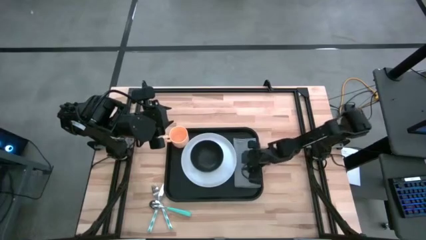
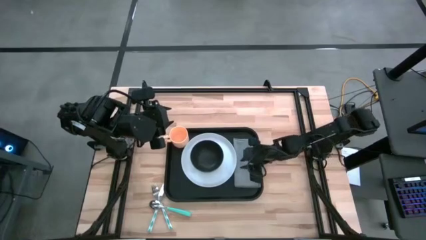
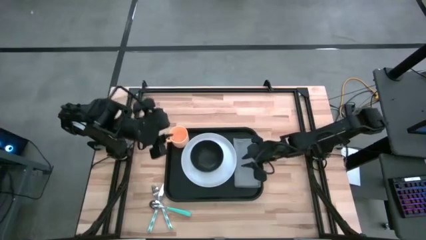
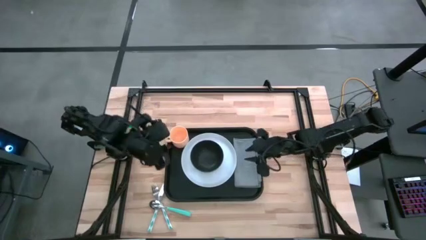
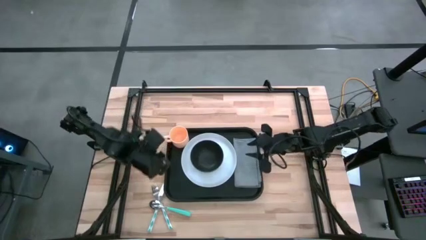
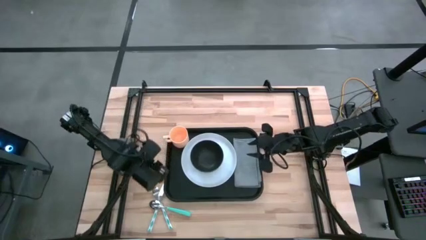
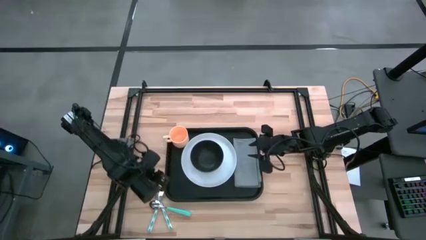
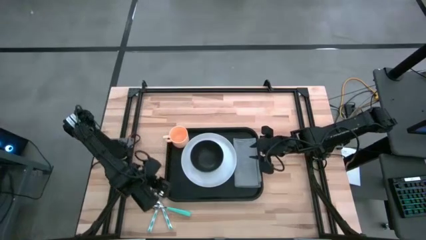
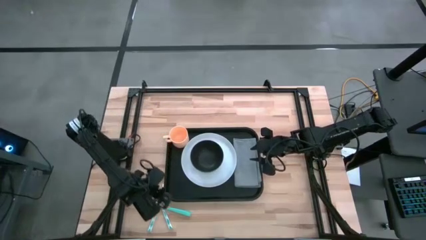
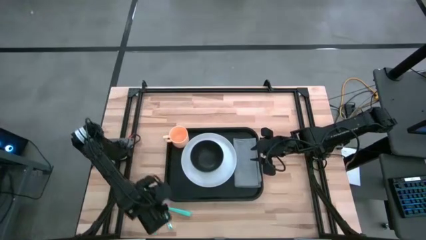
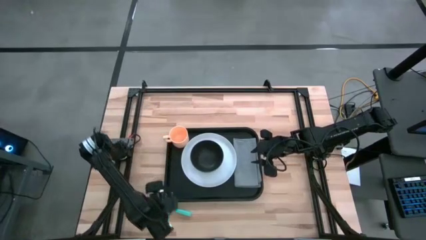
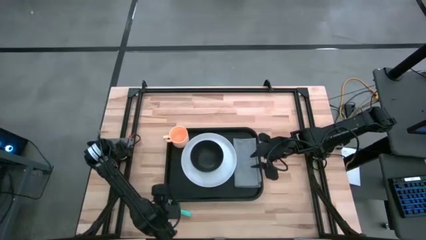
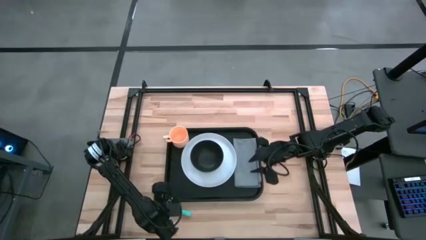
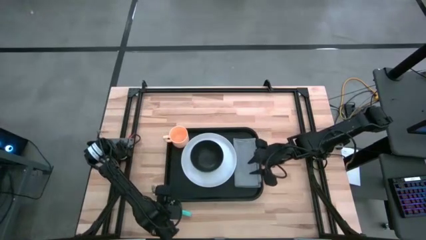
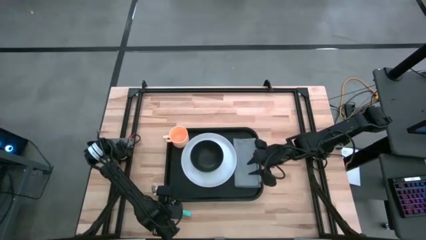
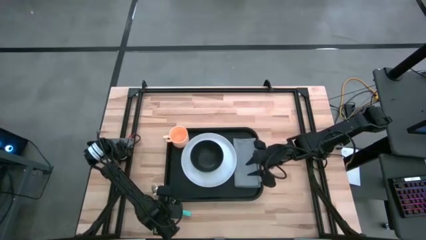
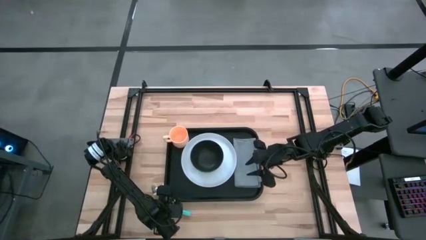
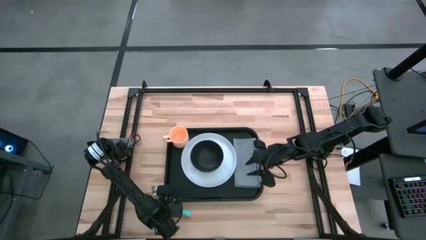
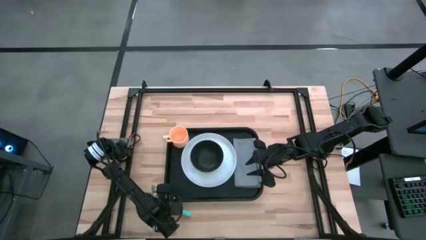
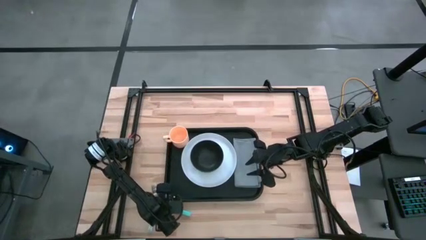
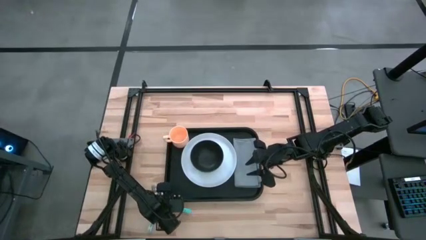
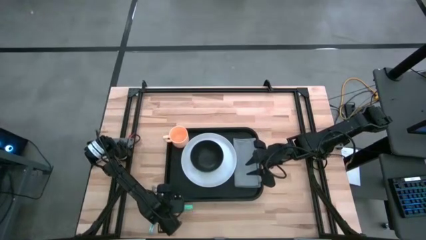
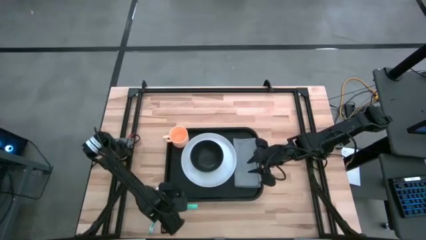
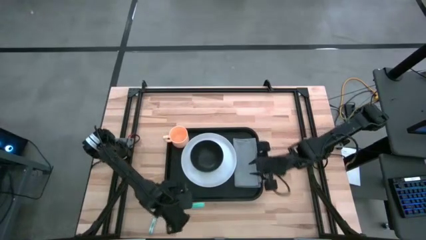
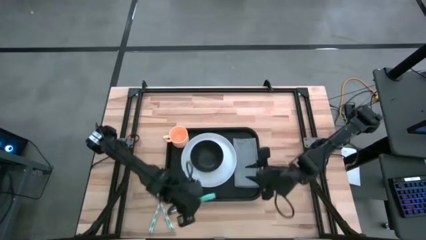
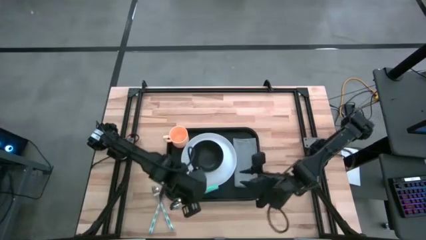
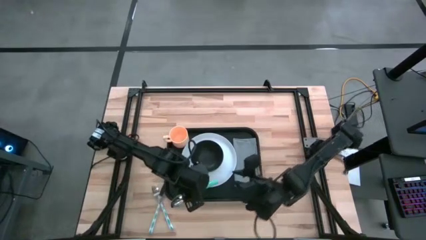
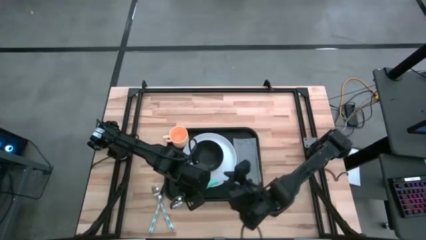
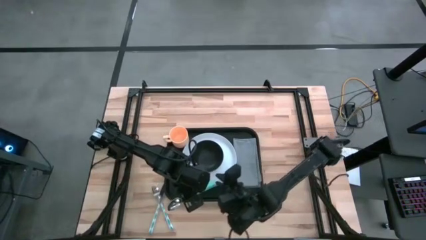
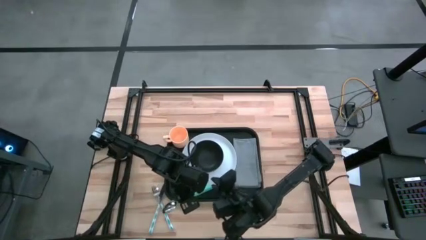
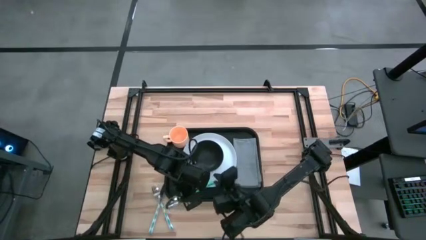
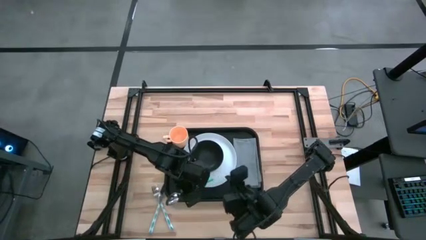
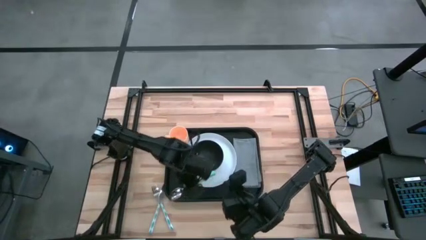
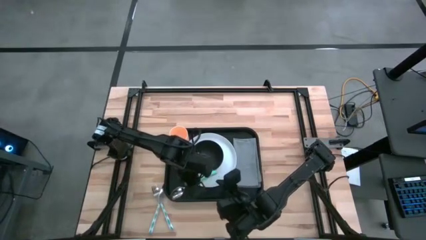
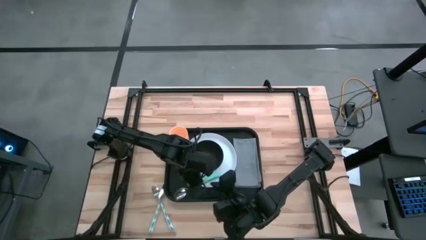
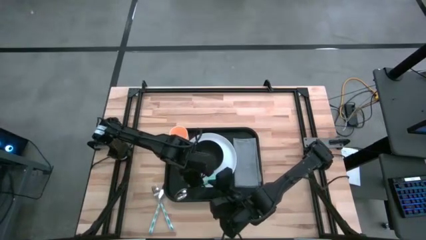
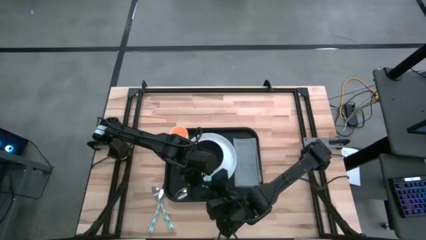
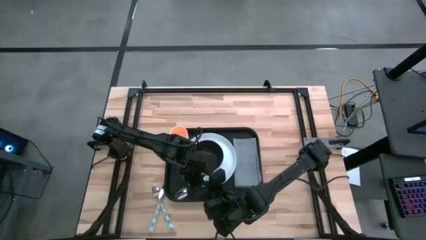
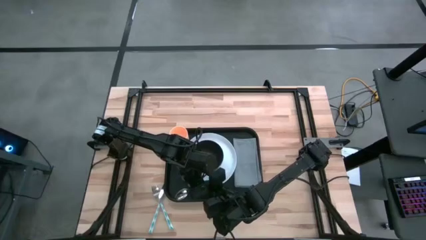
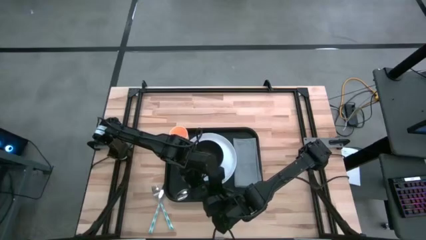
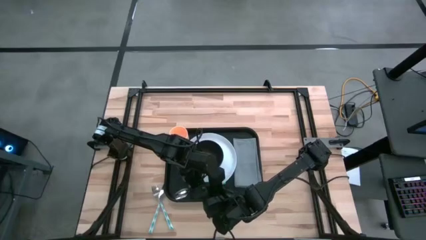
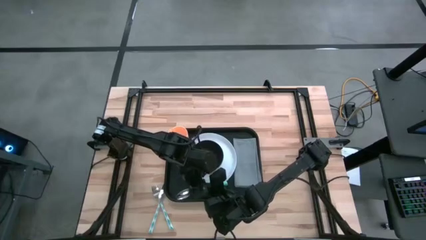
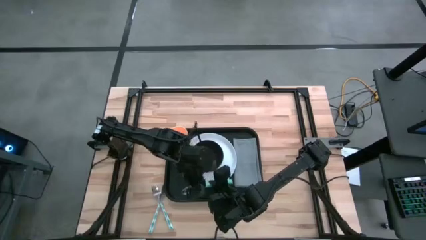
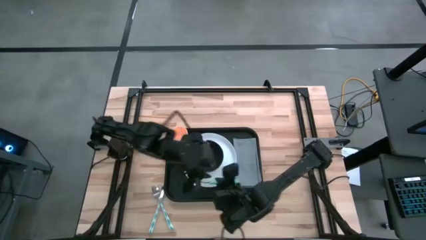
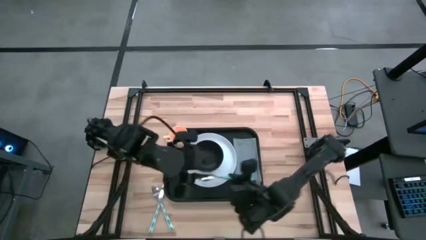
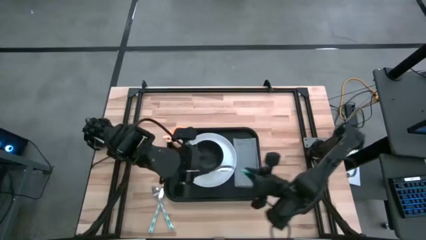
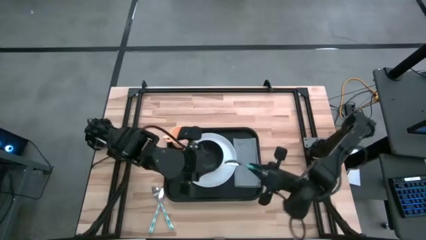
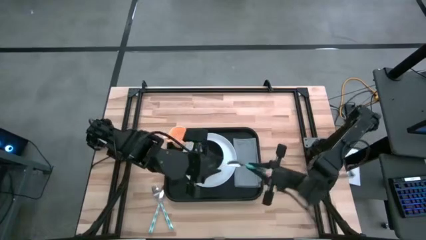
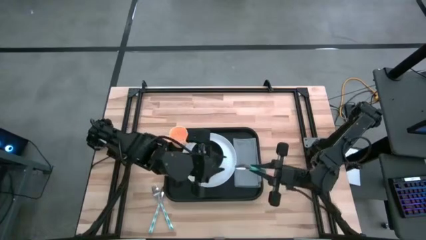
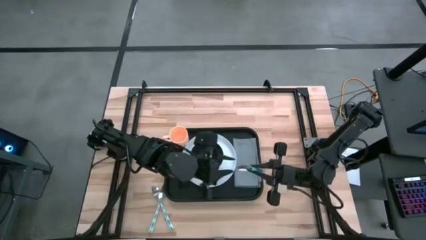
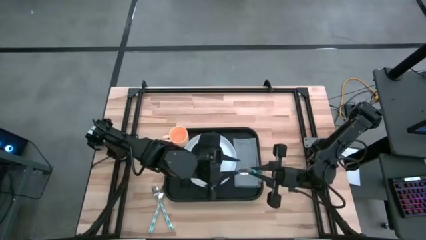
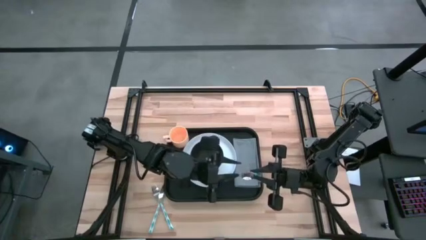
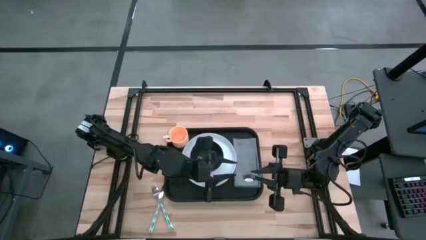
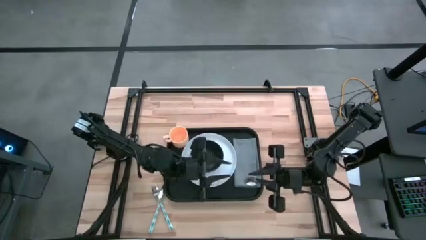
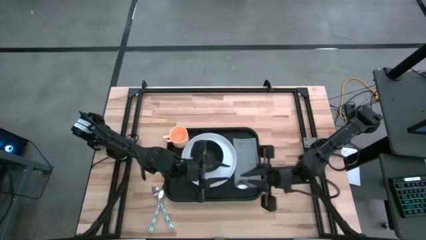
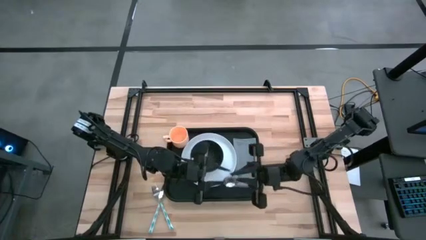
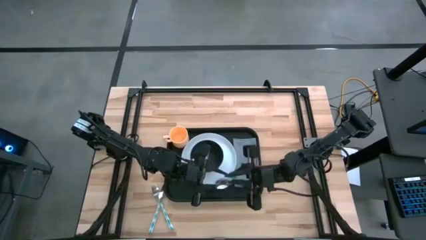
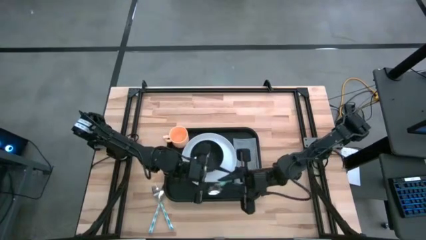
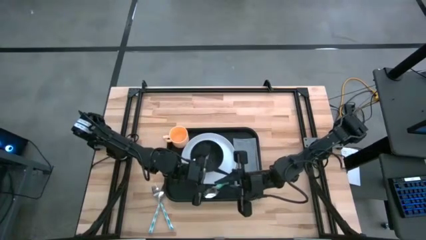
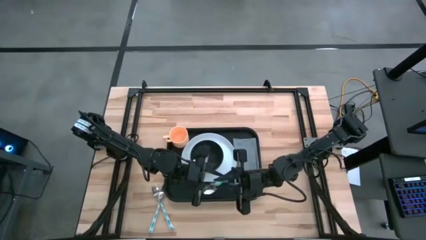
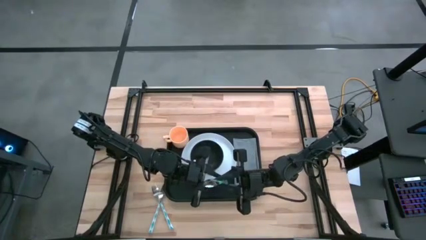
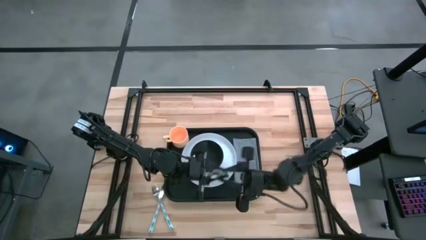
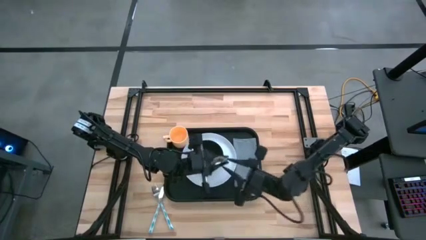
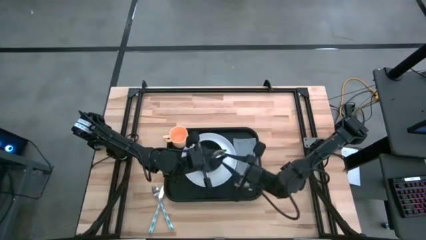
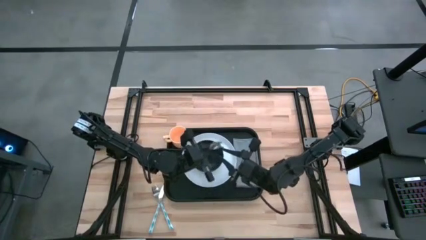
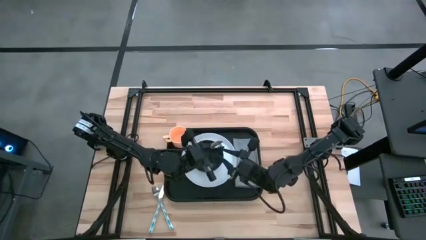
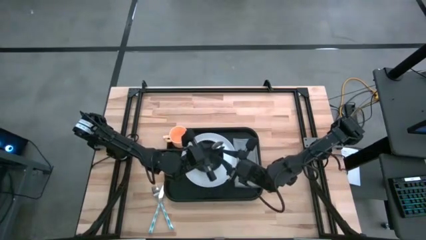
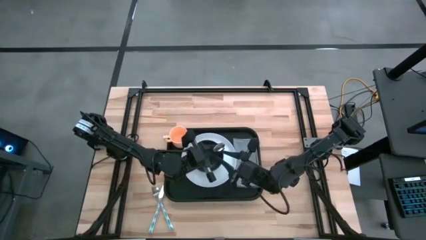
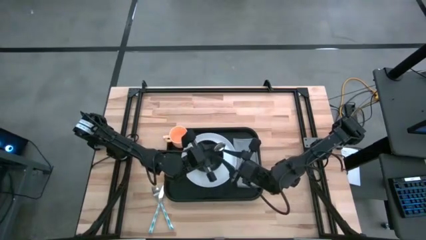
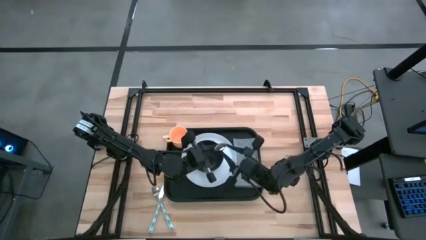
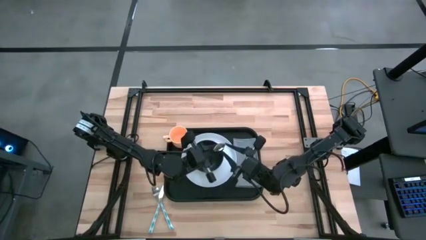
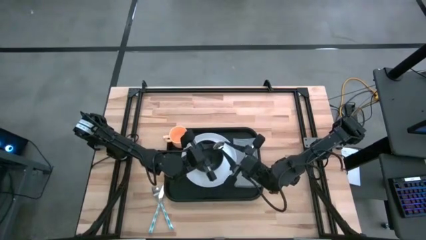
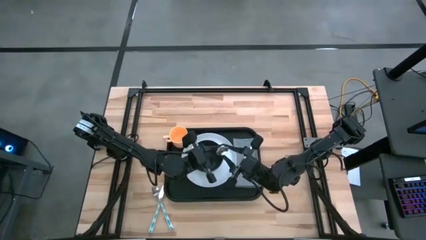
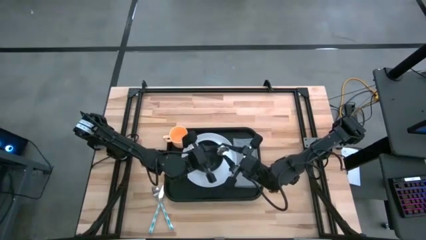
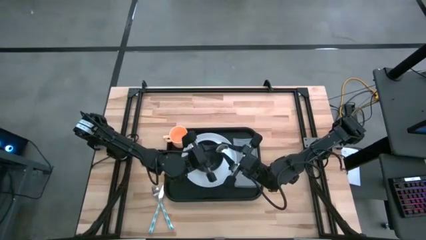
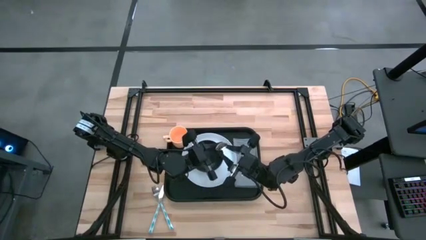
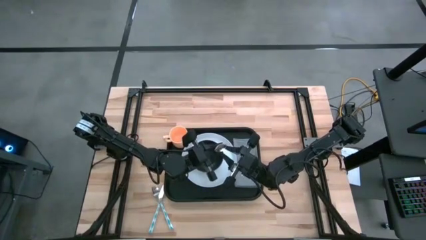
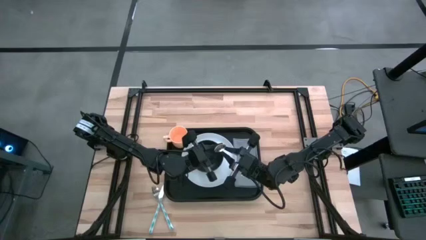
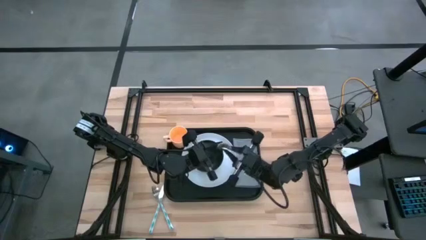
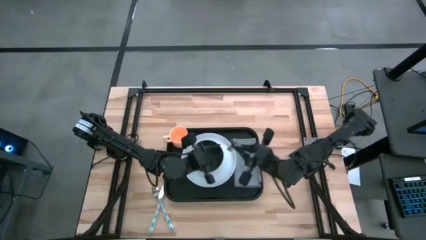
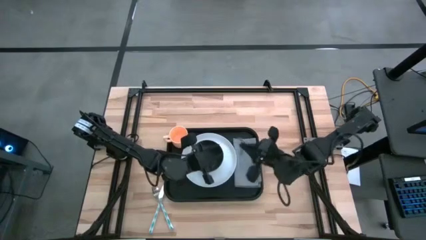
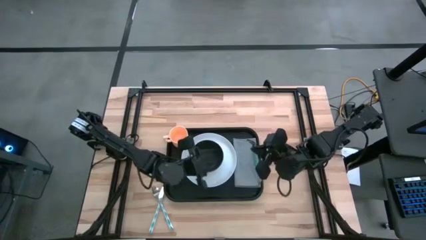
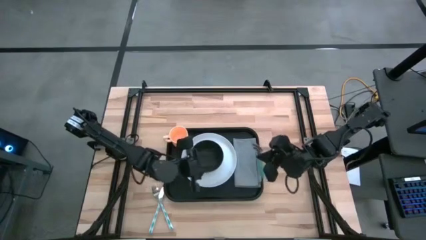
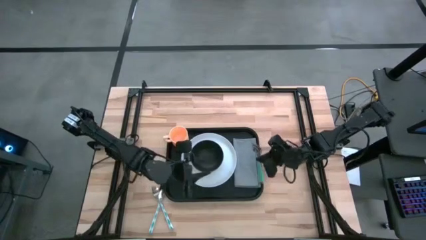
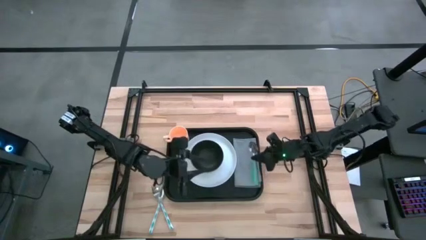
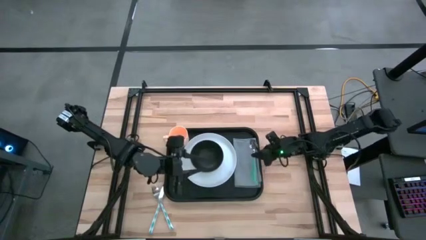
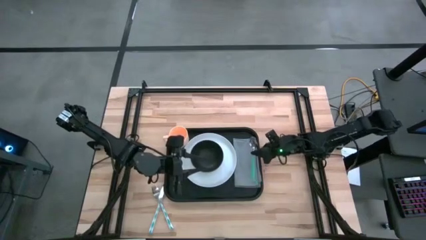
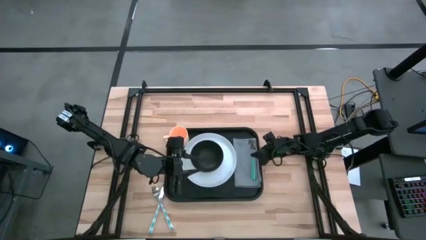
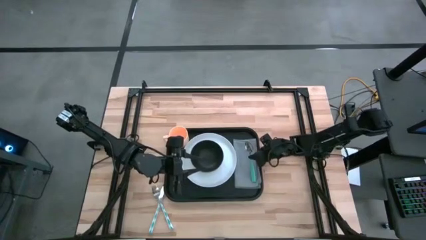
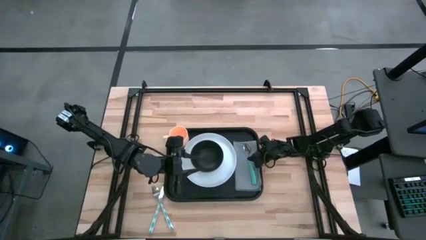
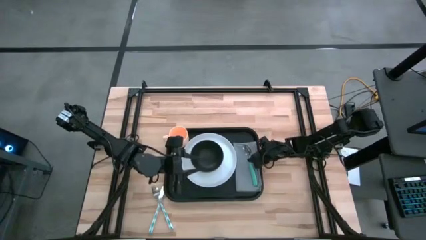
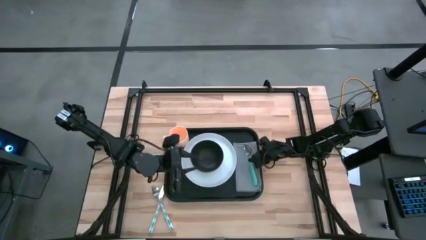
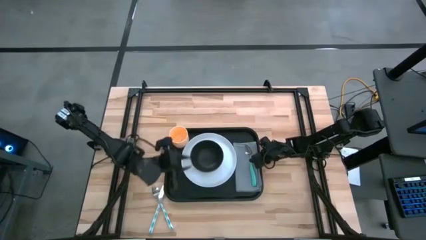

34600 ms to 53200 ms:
Task: Set up tray
Put the green spoon on the gray napkin on the black serving tray
